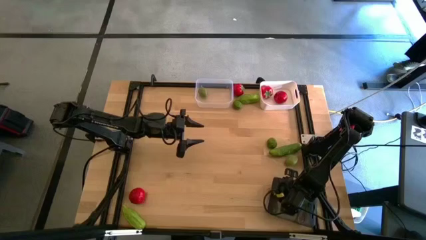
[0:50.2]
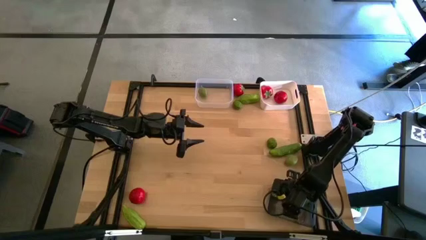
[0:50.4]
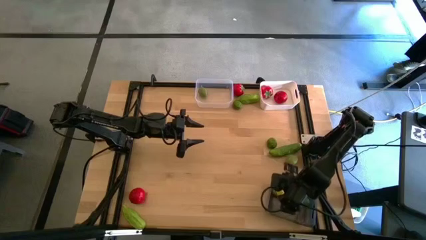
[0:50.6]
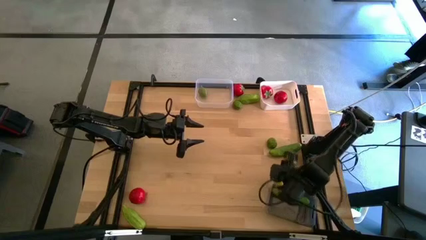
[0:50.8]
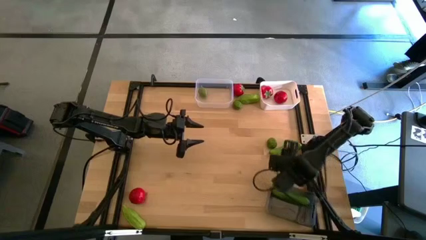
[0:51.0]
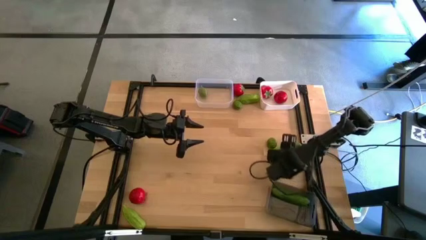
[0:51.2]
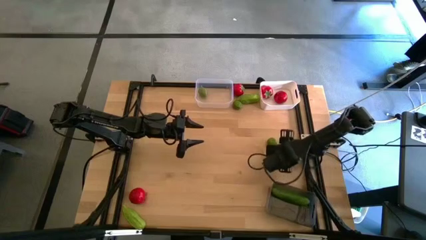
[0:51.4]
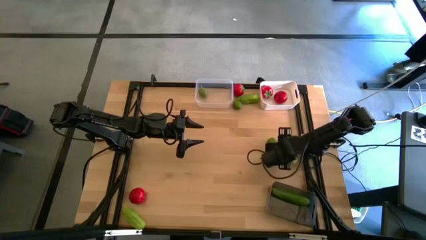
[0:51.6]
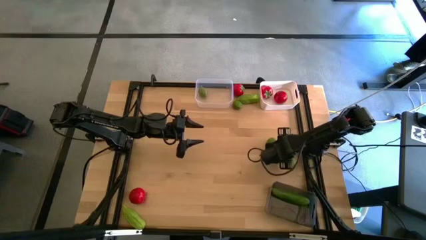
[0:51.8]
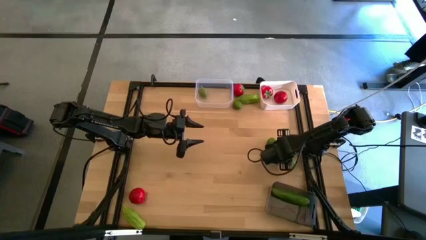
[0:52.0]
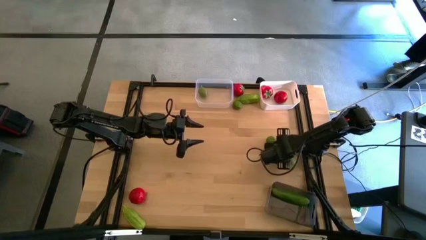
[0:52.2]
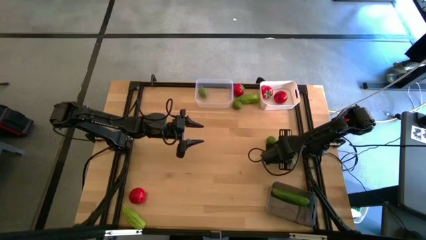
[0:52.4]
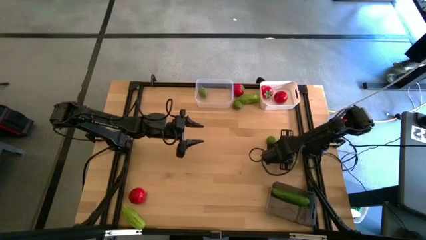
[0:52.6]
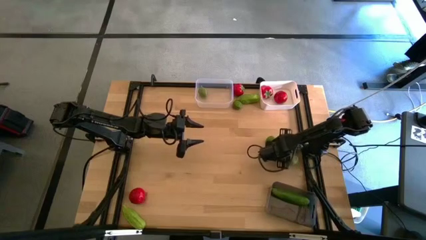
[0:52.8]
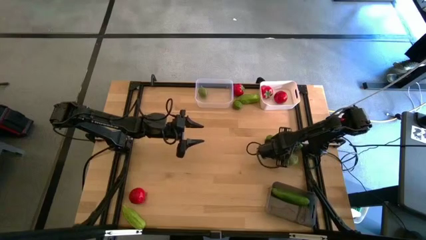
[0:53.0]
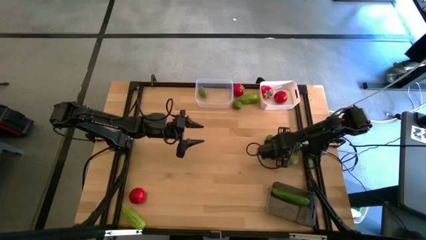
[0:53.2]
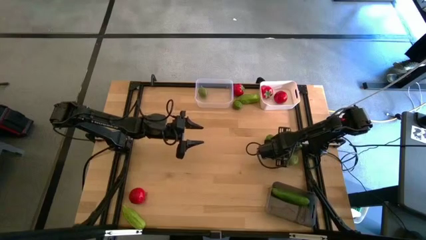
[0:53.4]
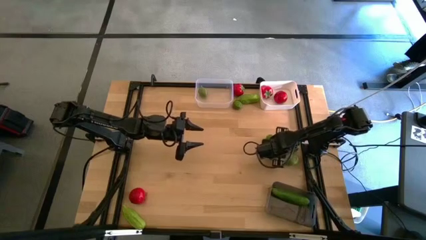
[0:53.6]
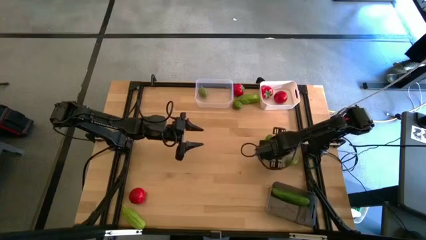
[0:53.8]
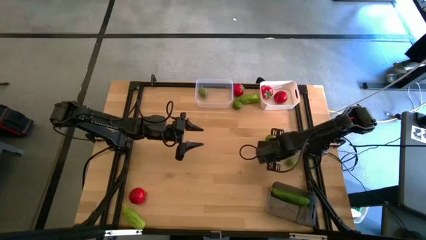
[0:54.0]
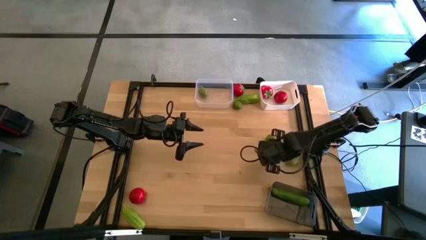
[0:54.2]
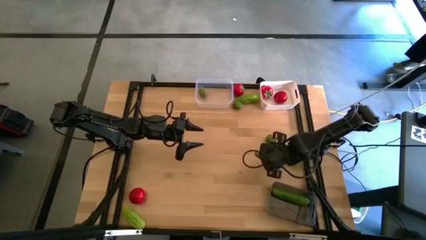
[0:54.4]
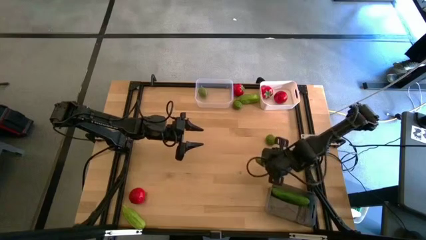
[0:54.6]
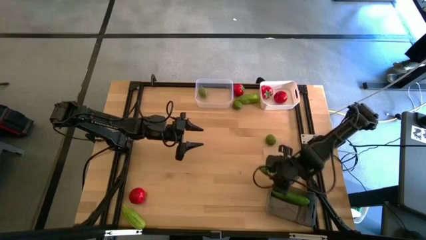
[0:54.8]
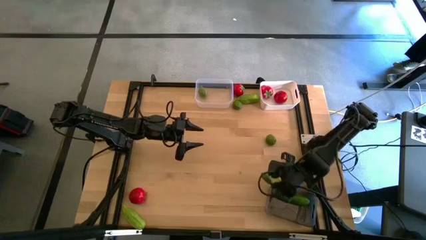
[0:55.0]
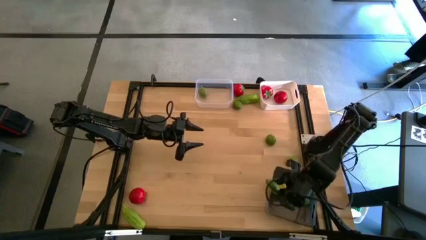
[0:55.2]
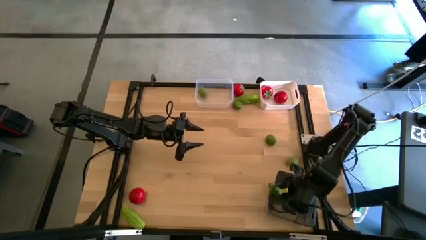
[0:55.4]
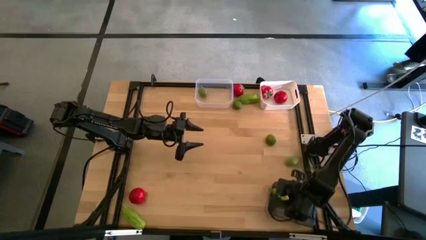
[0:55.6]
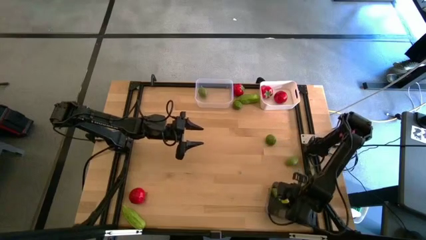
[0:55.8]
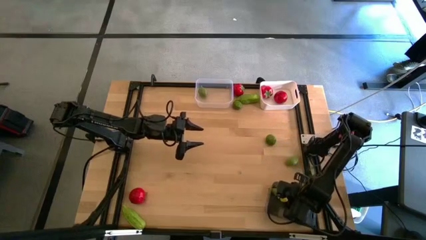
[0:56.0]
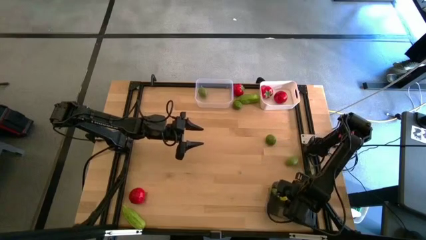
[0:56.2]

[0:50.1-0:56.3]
Task: Sort produce into baskets
Put the green cucumber into the black bin

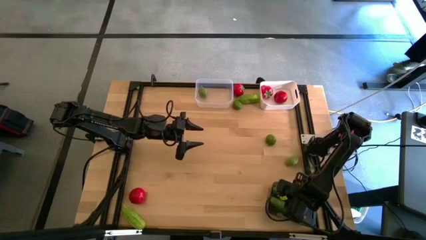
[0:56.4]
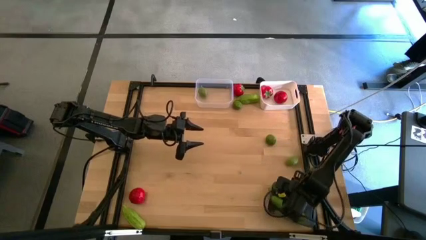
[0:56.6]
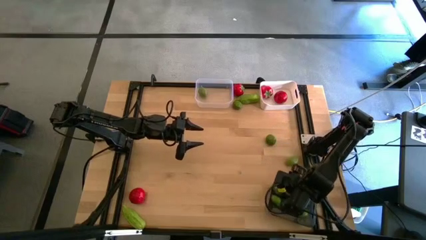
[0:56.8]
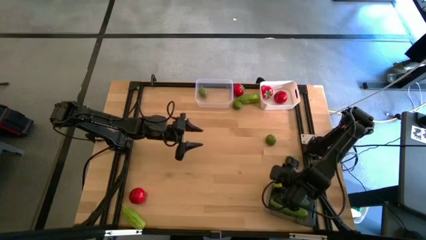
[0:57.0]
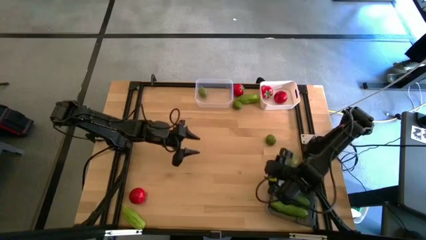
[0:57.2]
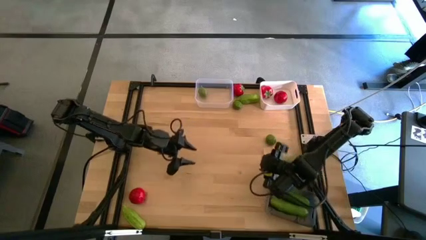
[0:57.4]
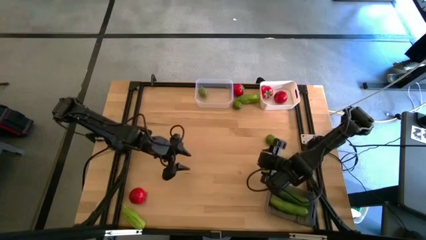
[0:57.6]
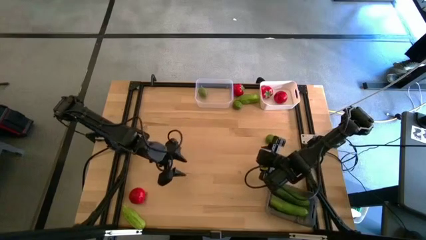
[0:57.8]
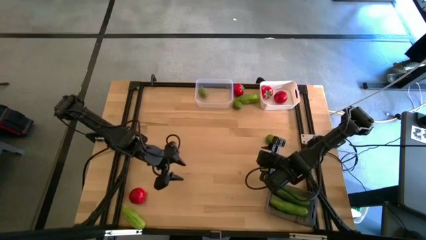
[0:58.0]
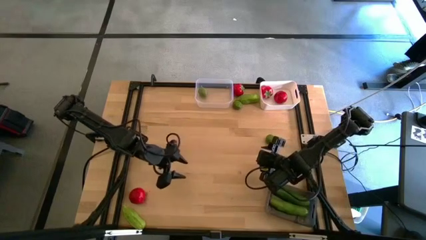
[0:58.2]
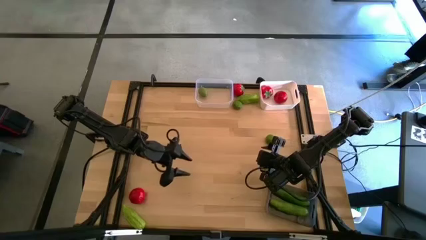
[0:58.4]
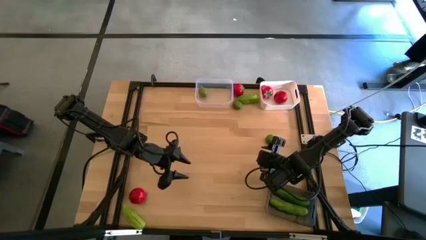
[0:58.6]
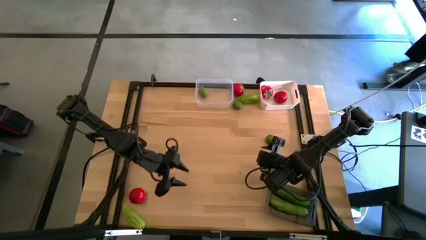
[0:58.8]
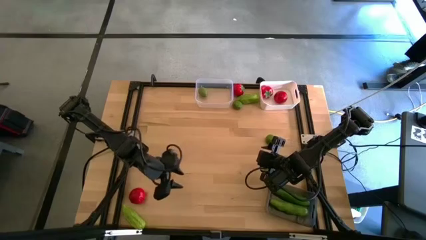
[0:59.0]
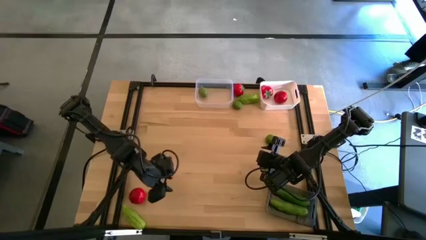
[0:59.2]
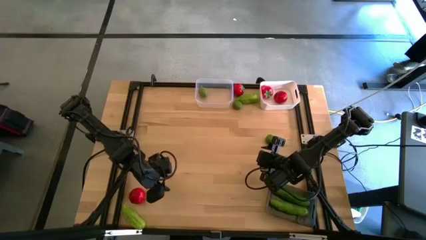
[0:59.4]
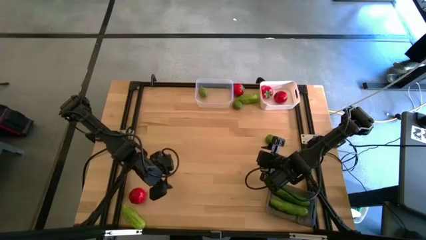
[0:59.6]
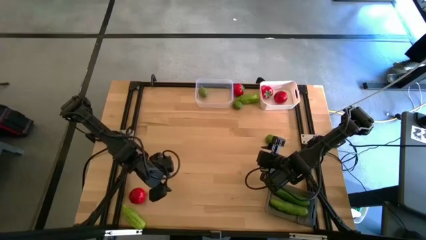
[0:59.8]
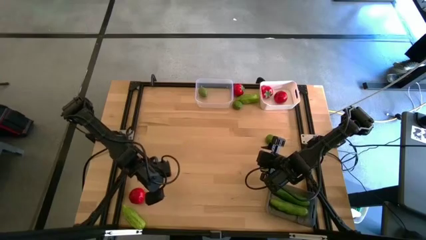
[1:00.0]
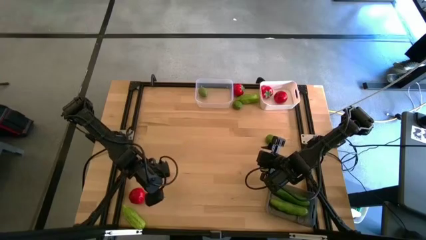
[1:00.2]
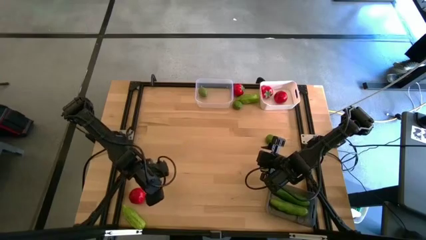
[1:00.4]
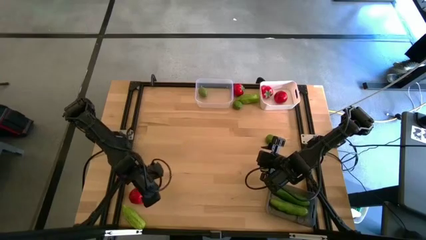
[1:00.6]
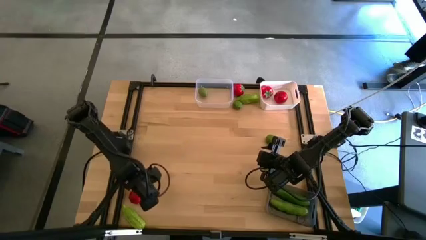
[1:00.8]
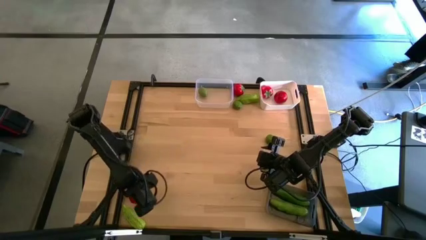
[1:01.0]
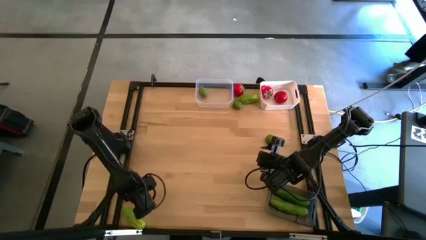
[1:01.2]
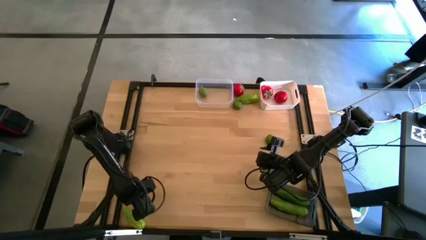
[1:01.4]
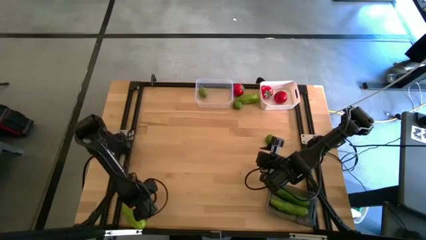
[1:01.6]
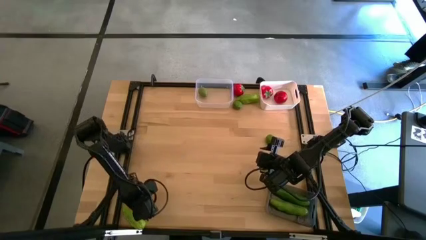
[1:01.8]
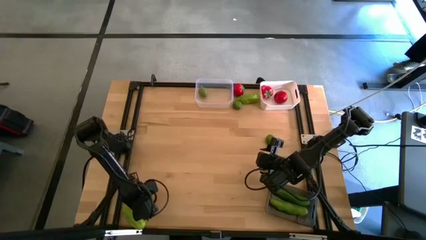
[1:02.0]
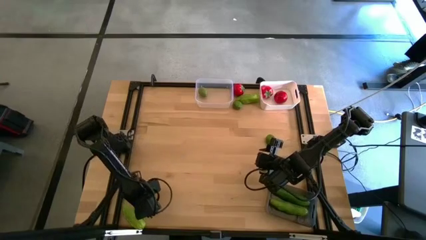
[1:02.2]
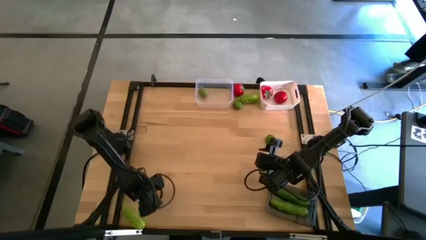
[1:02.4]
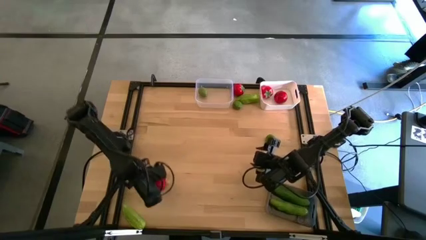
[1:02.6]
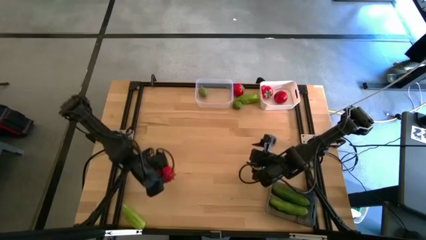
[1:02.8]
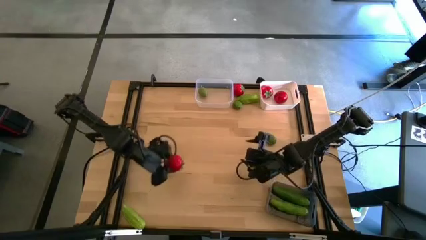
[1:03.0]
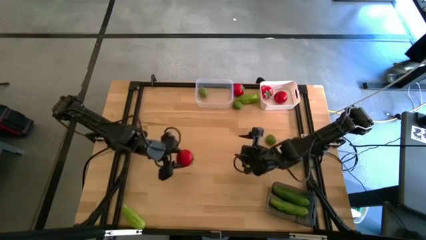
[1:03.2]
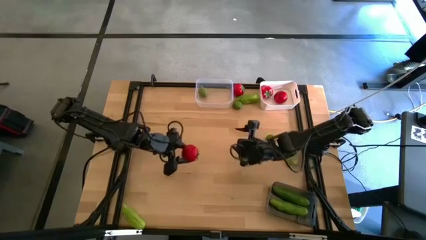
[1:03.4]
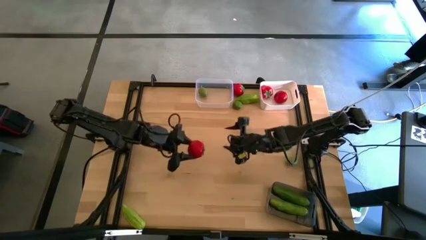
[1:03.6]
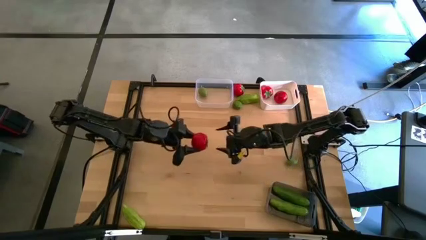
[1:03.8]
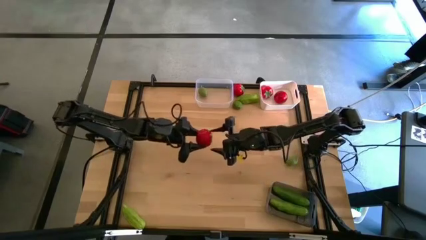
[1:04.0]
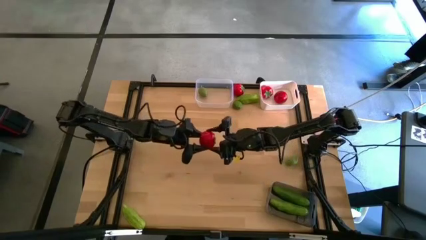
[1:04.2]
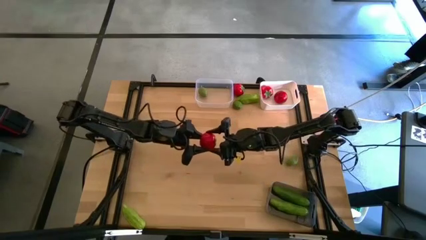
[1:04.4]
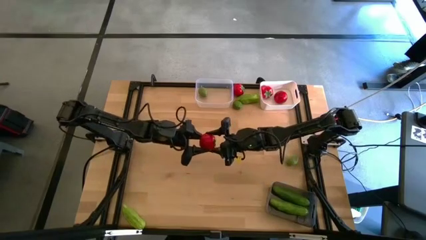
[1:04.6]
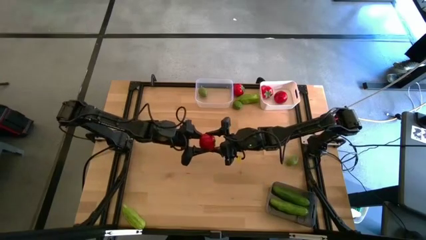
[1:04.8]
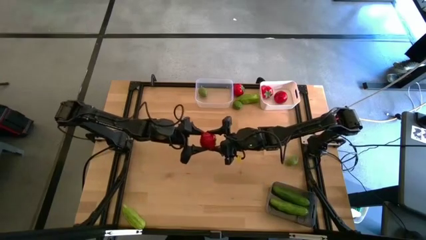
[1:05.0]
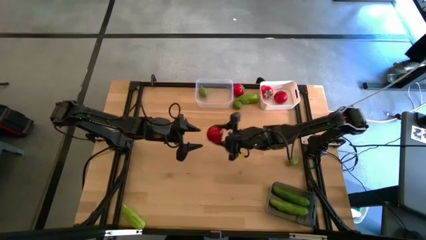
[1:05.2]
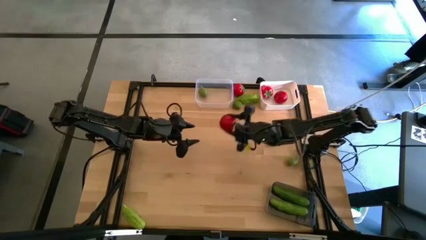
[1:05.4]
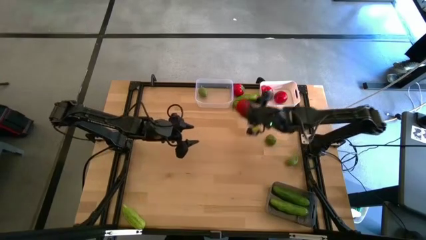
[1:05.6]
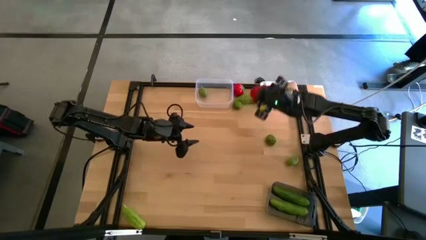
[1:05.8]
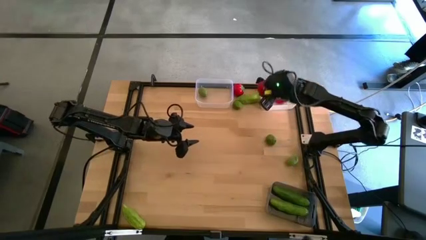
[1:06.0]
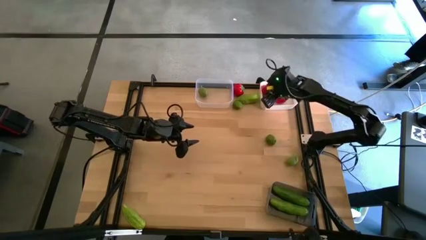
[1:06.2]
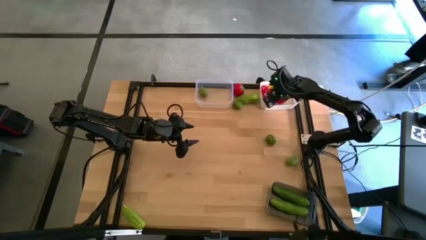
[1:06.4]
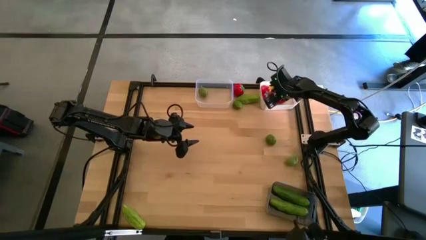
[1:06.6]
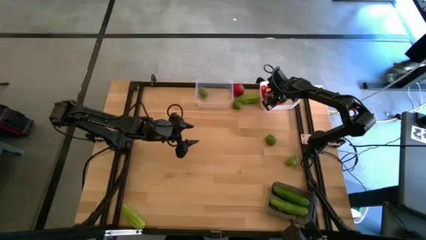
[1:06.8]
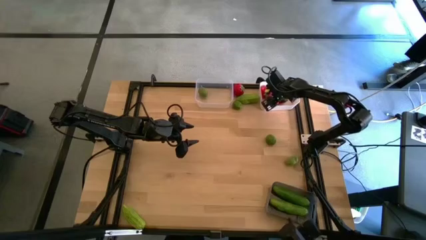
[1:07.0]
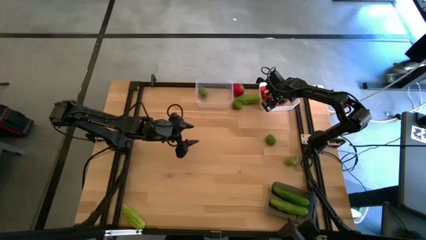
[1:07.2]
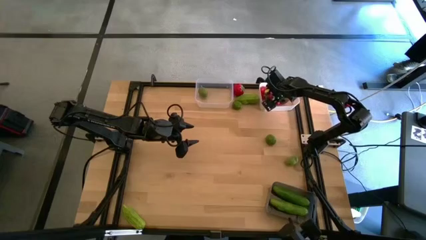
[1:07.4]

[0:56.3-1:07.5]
Put the red tomato into the white bin
